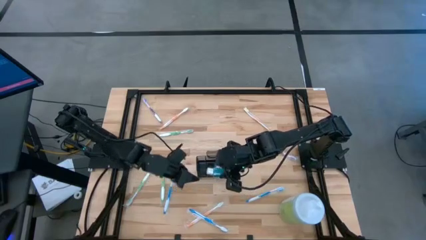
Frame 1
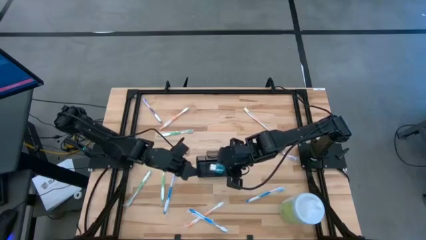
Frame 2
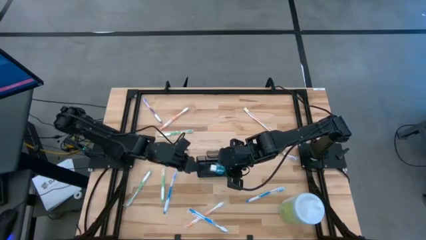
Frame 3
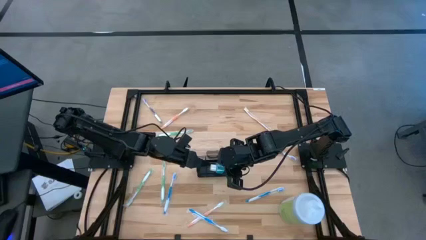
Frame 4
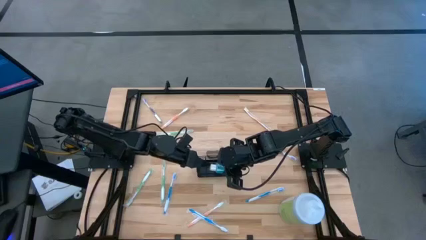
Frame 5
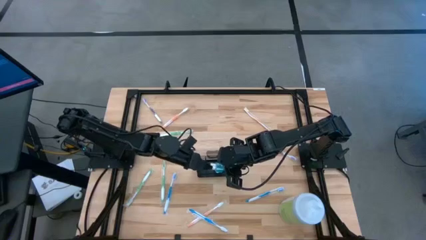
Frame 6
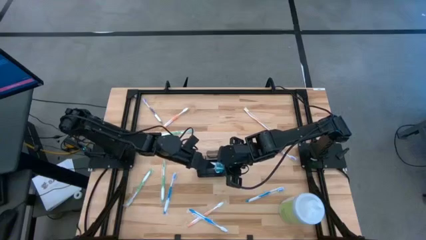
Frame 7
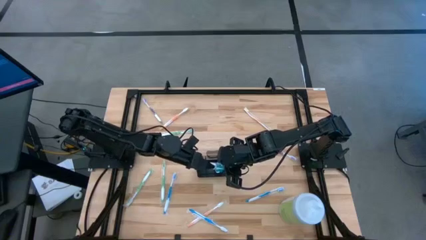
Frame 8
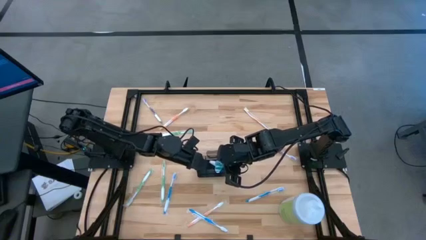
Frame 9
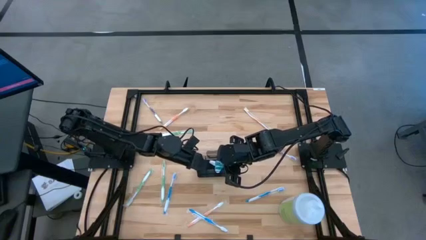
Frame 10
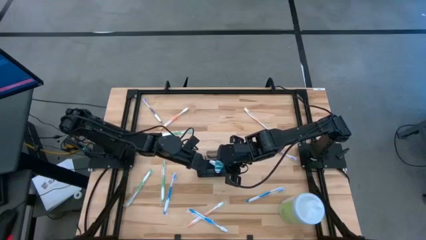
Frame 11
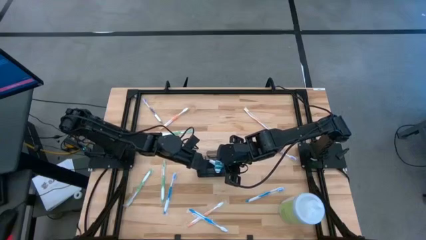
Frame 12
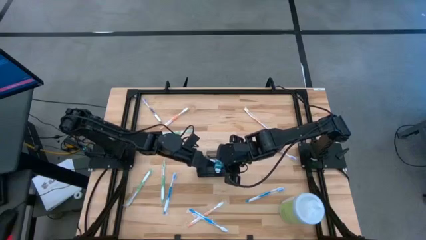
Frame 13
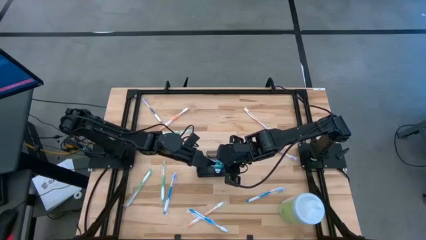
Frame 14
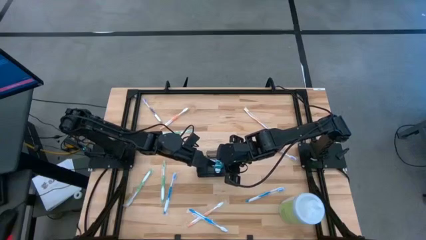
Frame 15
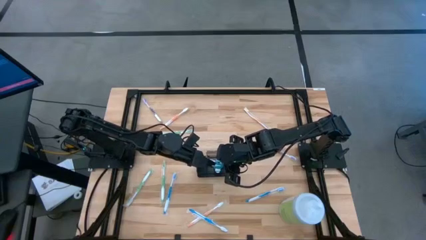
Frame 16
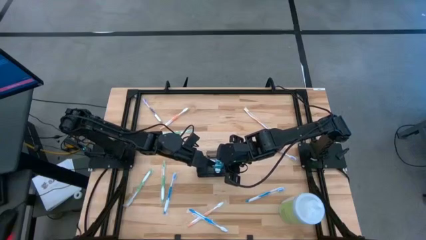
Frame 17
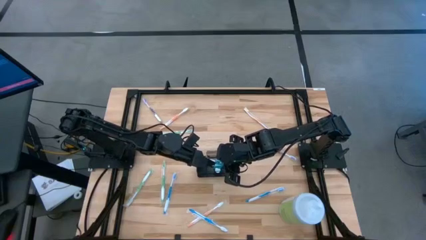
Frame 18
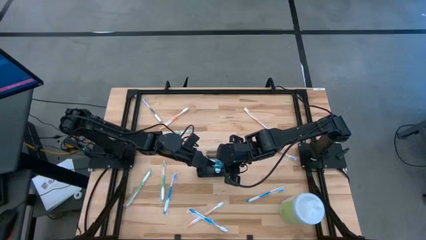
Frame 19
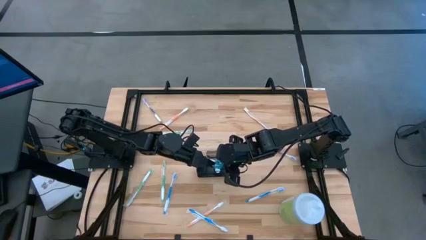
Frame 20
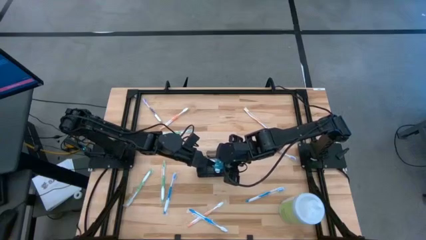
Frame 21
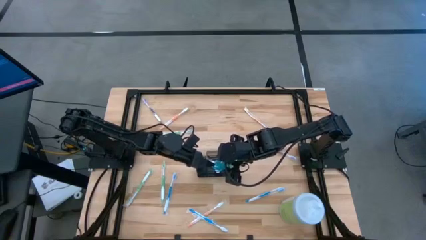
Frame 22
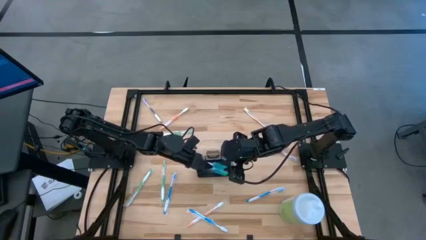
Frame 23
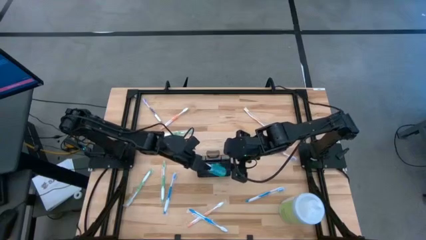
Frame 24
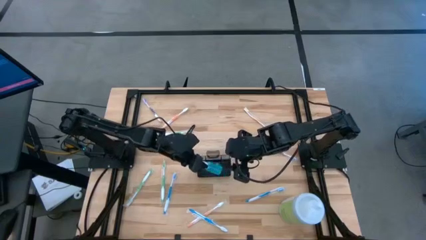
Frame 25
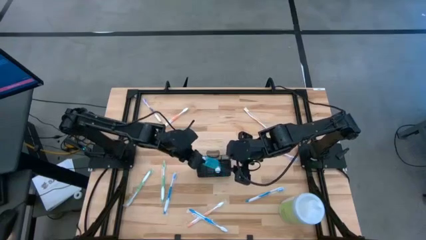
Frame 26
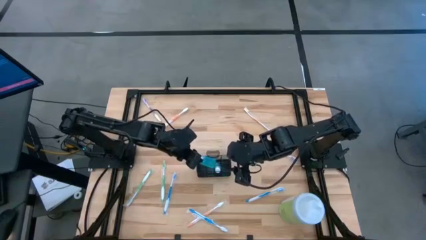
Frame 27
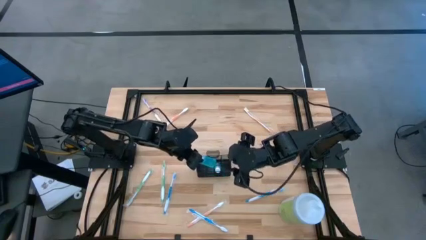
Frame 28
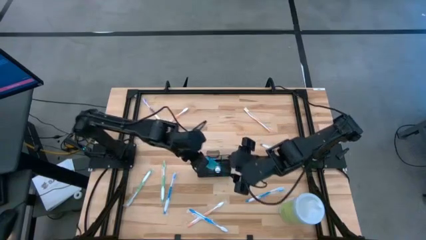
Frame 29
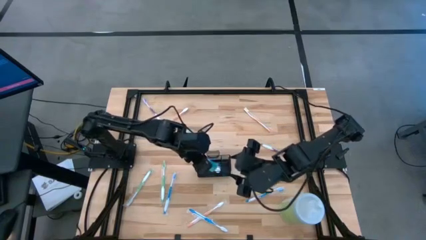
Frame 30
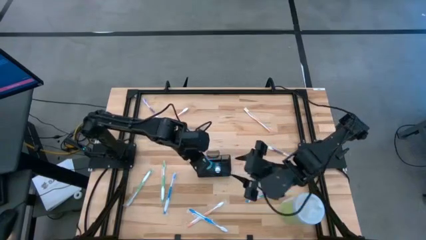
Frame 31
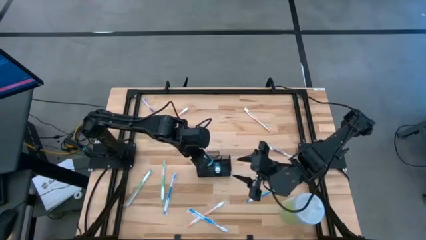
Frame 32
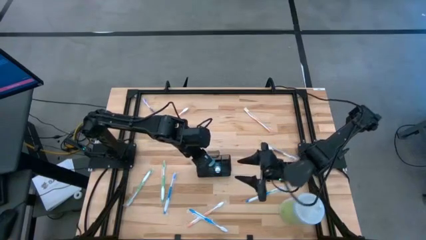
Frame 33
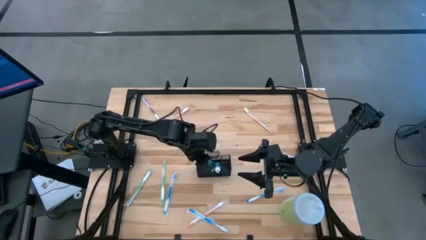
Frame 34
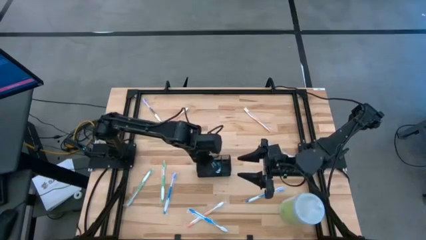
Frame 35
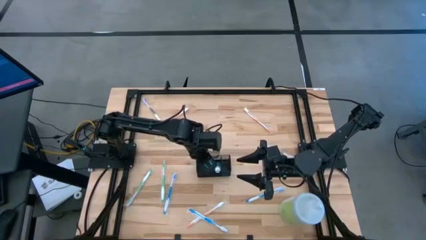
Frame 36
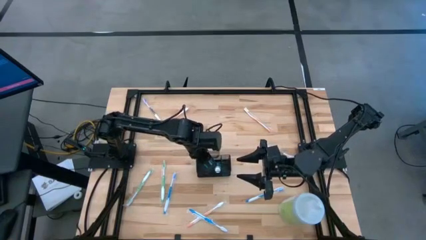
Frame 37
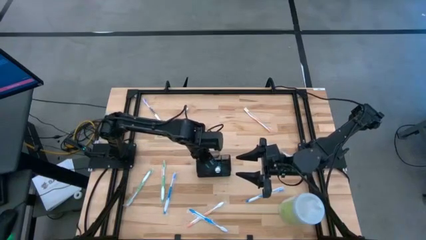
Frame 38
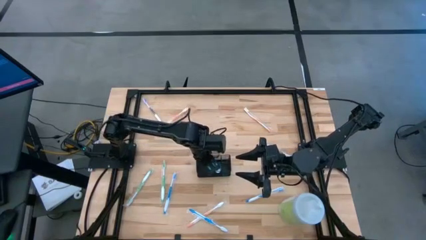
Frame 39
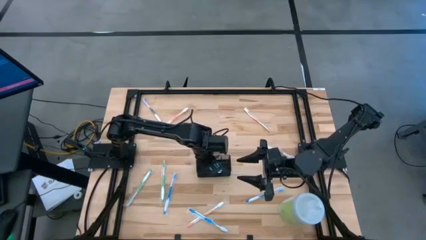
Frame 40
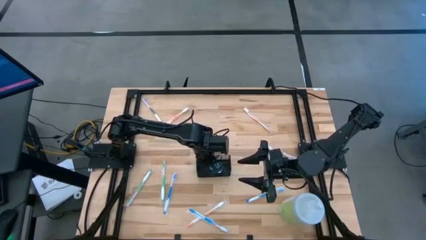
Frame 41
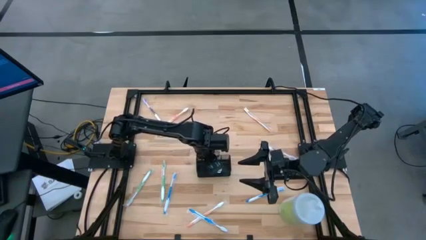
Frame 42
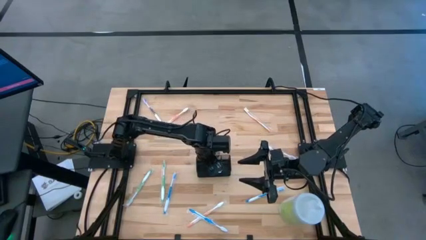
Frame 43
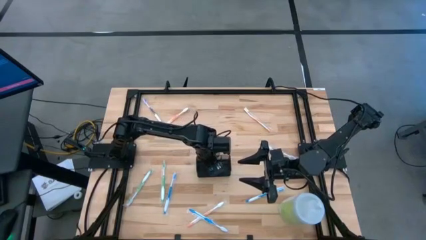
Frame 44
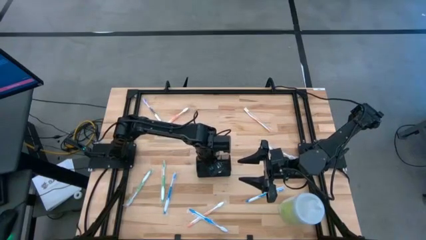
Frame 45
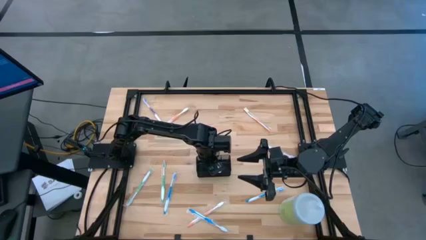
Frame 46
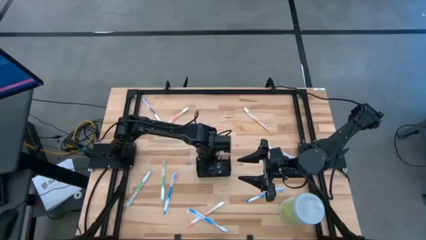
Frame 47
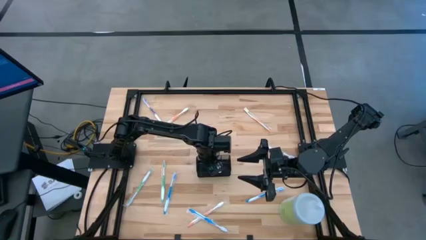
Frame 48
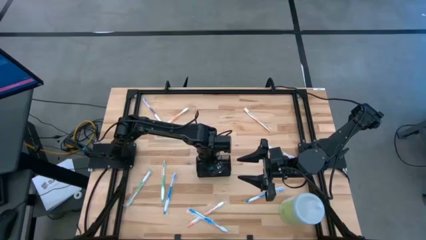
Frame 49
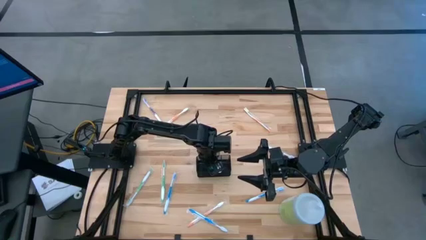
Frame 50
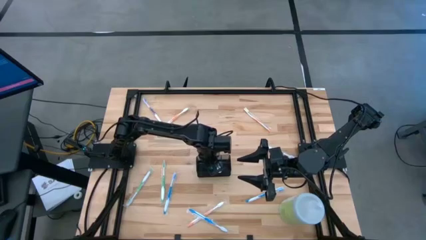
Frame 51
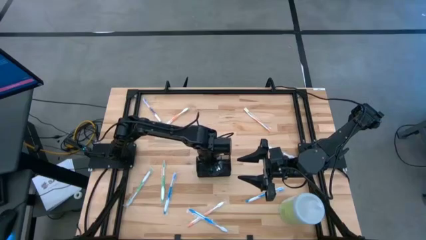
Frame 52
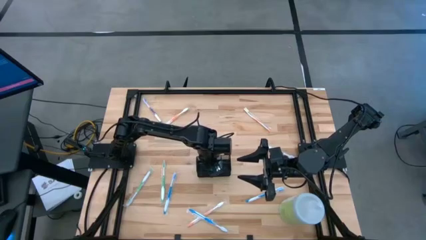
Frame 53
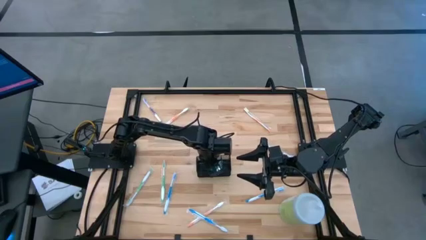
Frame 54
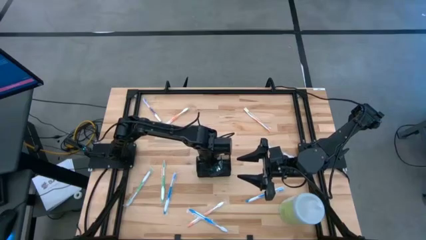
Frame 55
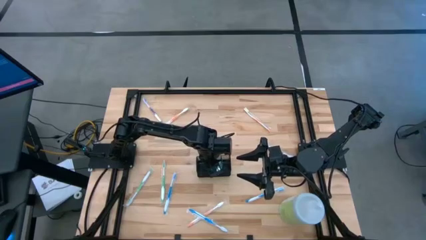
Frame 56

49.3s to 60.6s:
Task: Pick & Place toothbrushing station
Put the mouthwash into the middle section of the mesh organizer

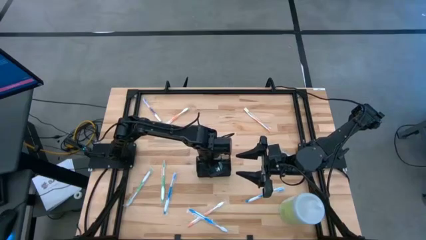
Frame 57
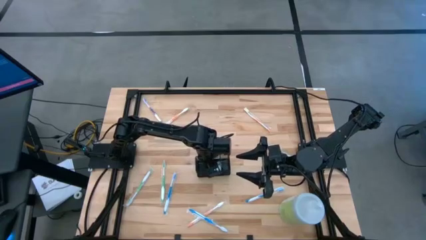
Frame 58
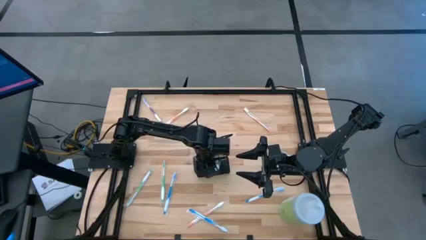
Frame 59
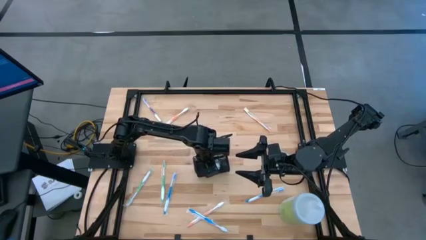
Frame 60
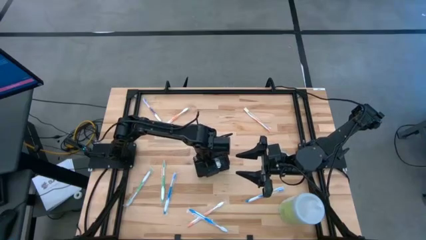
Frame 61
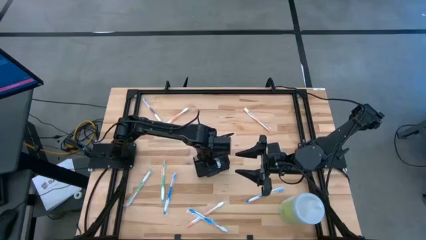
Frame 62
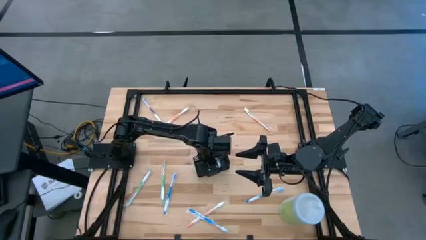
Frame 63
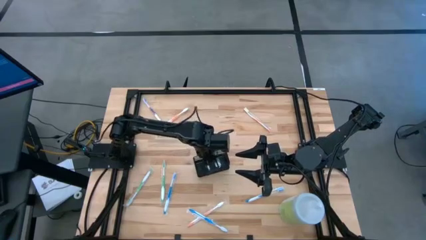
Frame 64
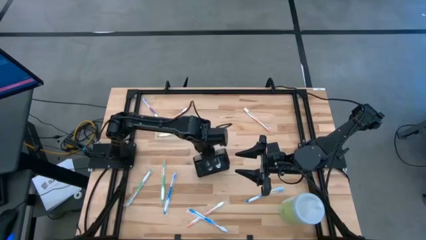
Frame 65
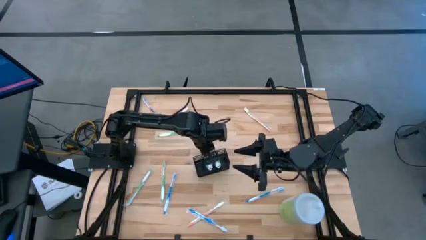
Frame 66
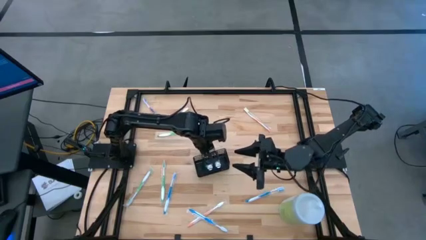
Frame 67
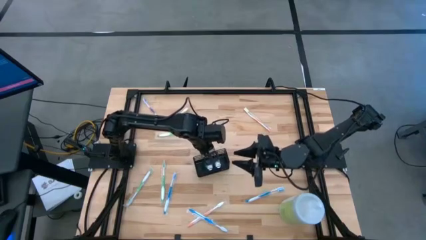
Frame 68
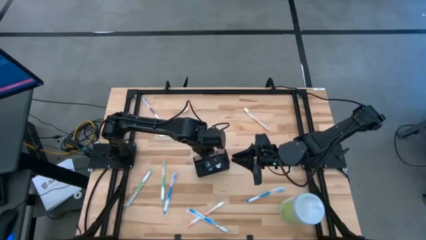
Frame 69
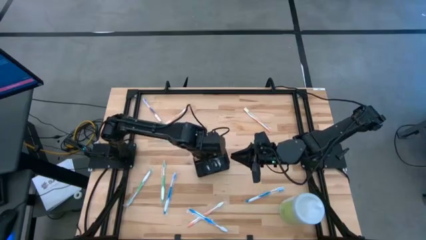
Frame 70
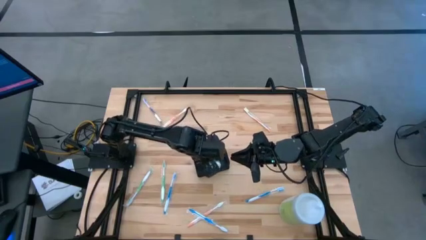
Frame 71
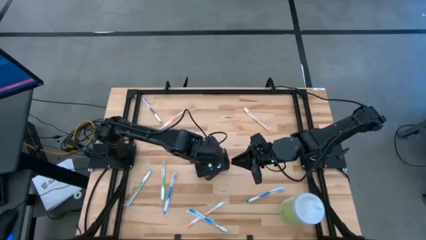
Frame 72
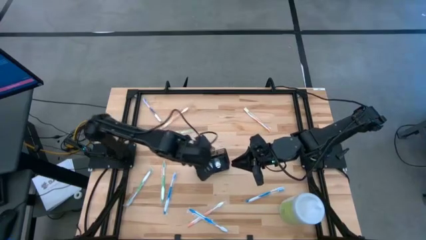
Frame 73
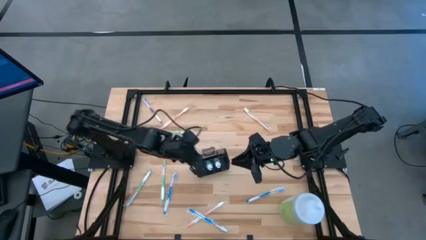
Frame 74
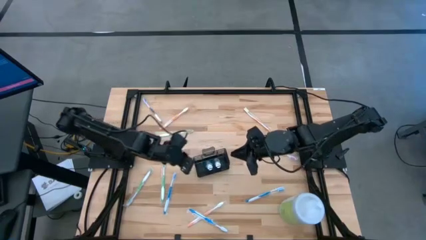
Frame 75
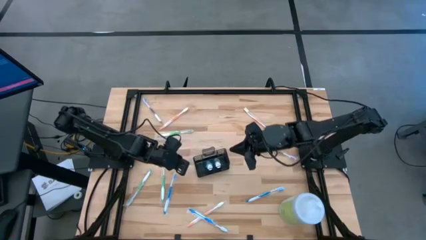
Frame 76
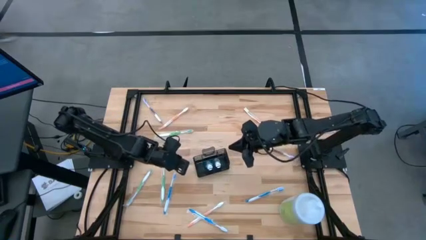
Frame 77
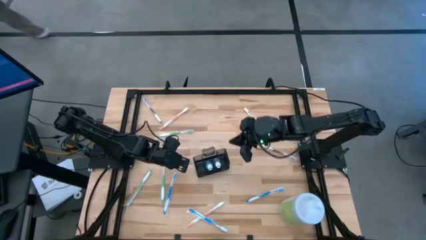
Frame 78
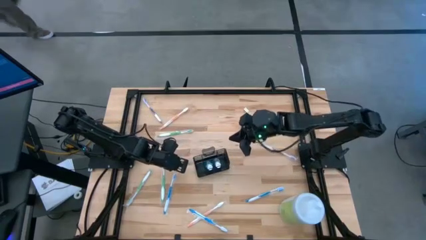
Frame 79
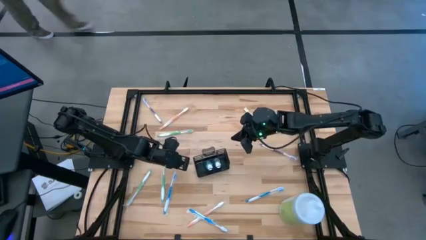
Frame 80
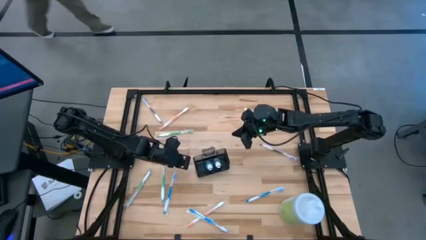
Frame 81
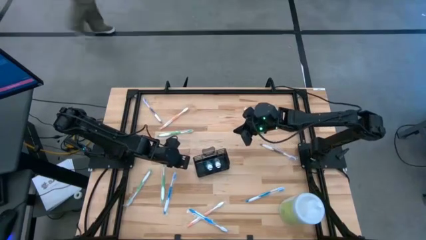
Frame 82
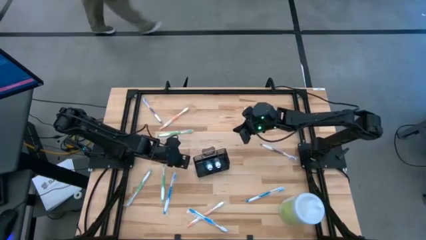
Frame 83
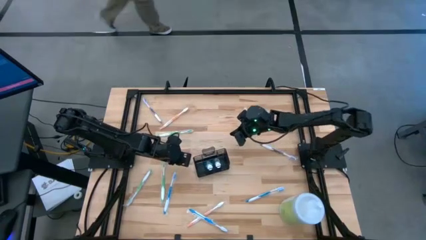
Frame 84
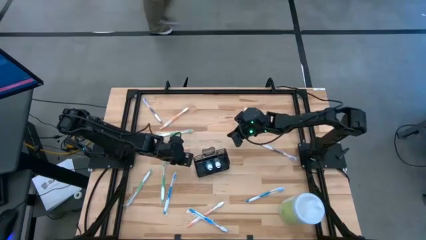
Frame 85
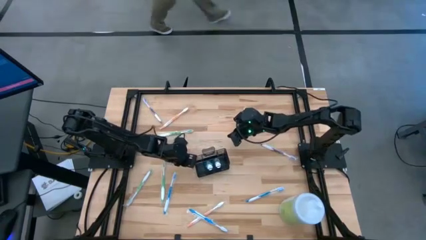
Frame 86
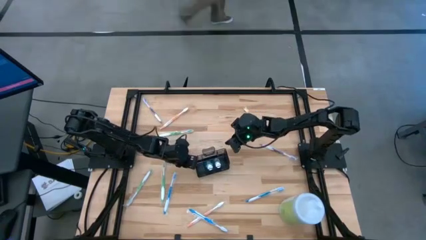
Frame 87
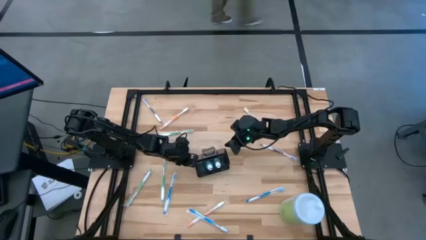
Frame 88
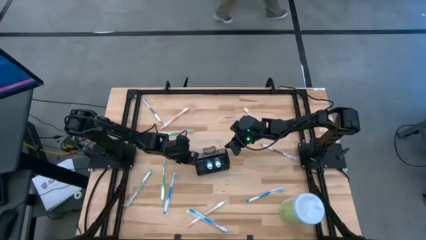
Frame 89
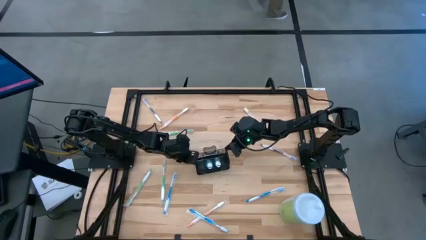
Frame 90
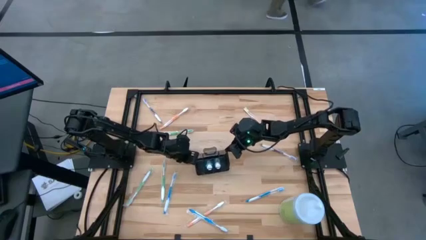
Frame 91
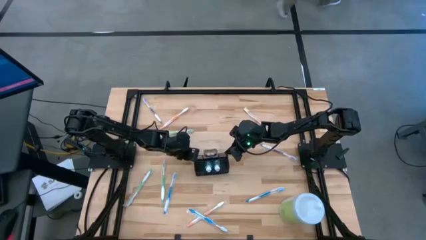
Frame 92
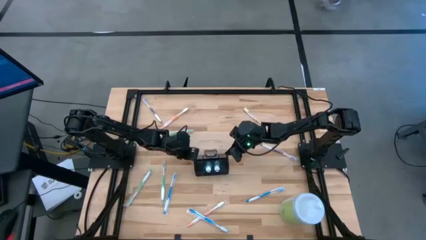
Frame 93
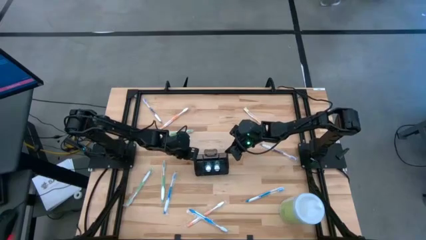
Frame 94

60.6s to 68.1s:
Adjust the mesh organizer
